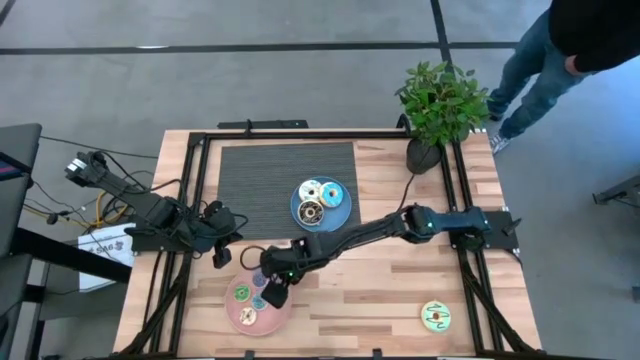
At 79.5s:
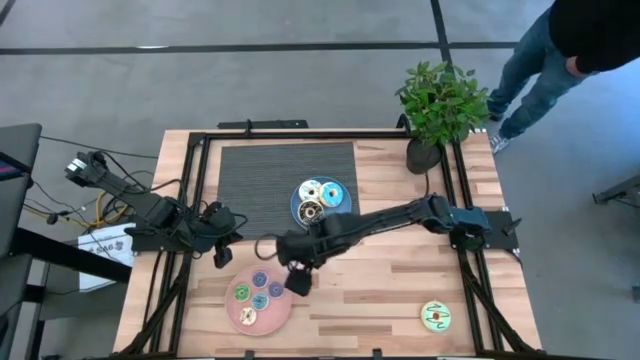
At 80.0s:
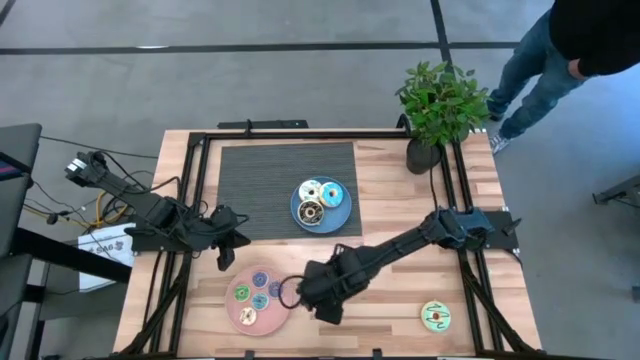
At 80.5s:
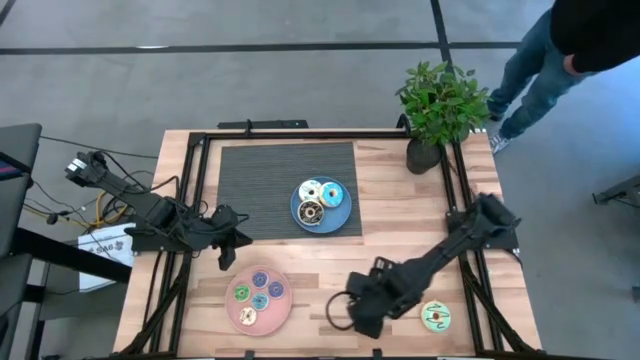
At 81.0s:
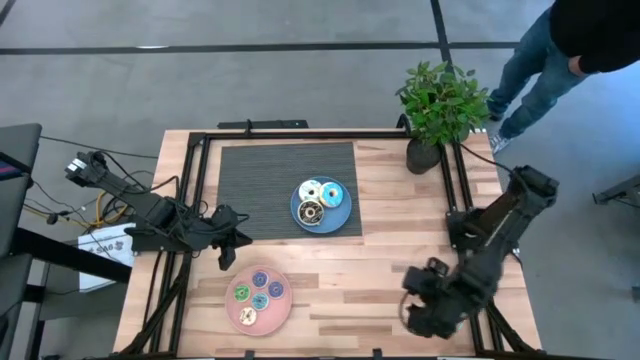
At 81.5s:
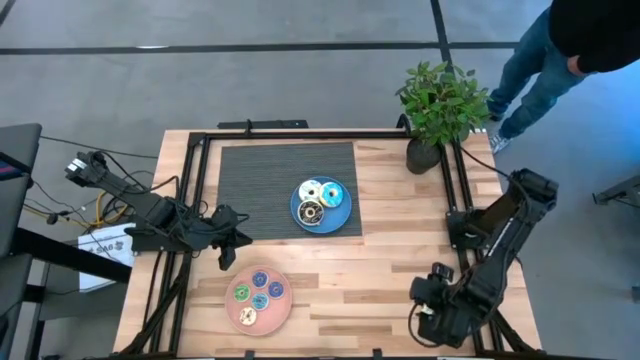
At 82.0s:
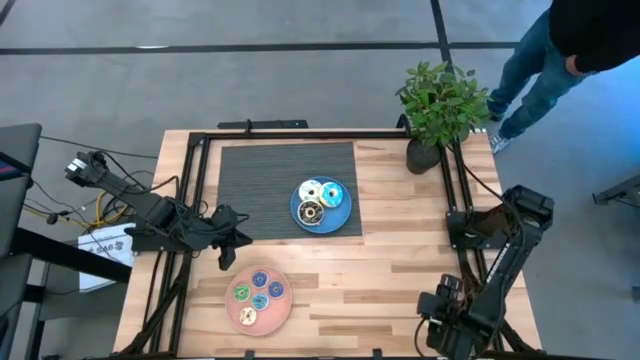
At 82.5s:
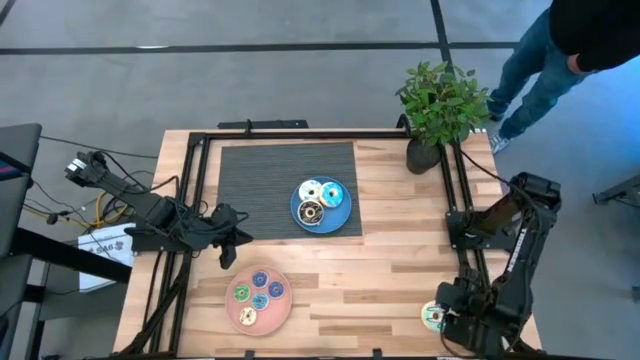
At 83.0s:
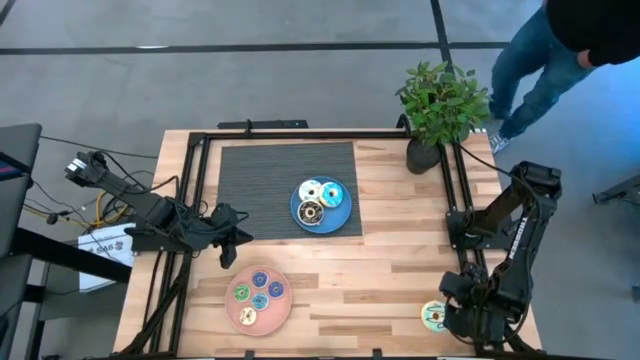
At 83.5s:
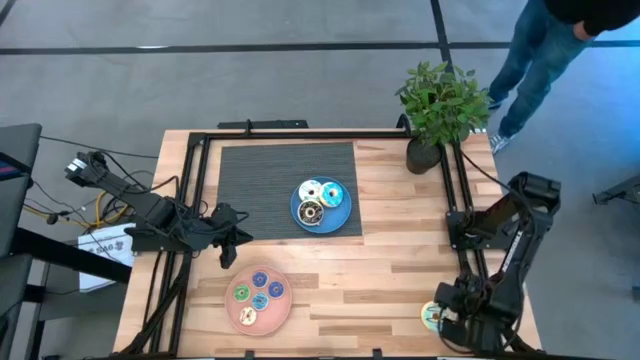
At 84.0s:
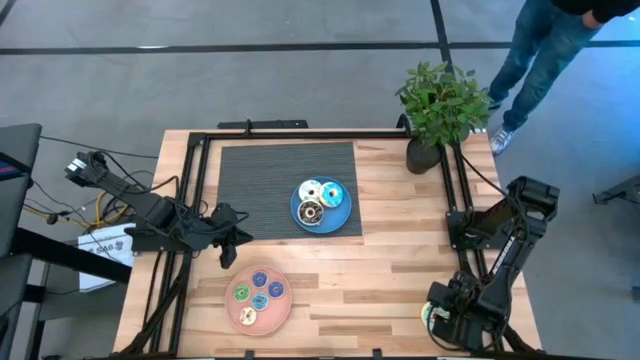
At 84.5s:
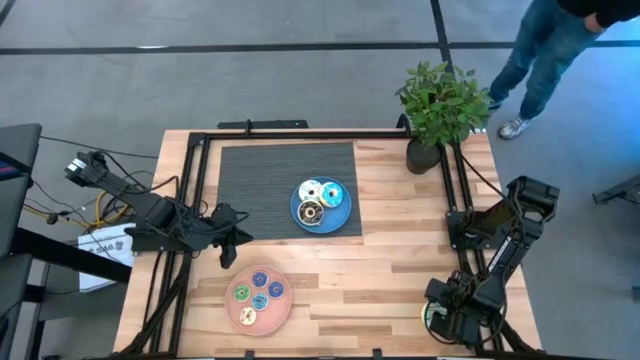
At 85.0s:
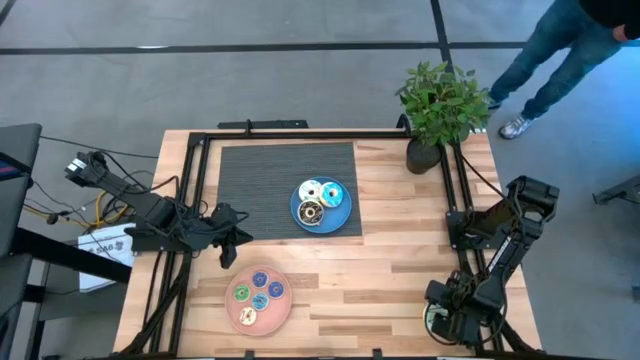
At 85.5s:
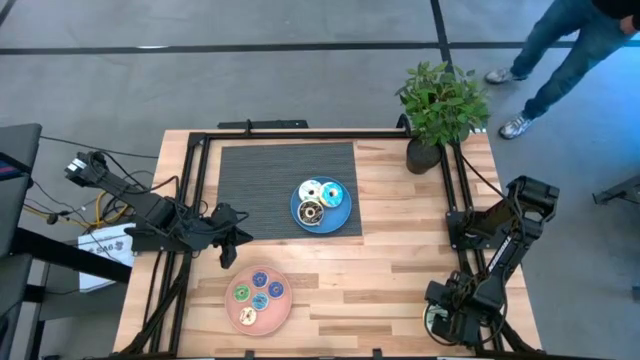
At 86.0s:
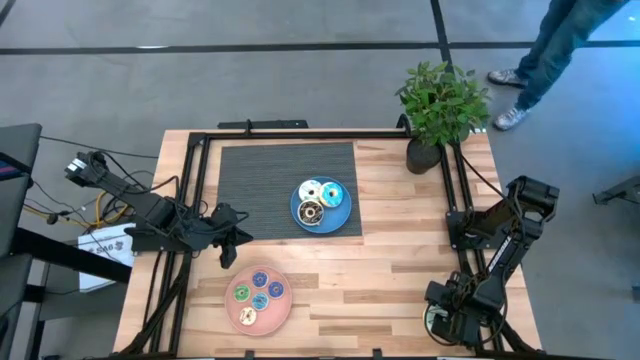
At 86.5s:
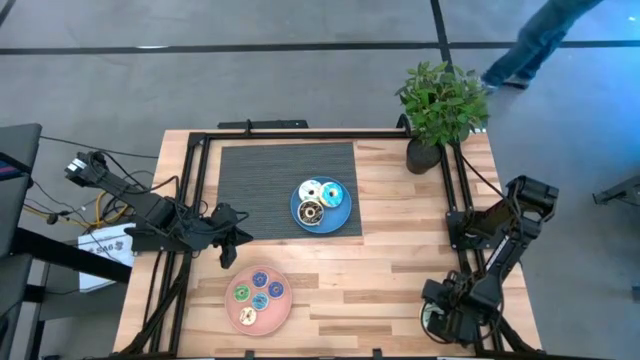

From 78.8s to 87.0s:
Task: Pick & Place donuts
Put the large light blue donut on the blue plate

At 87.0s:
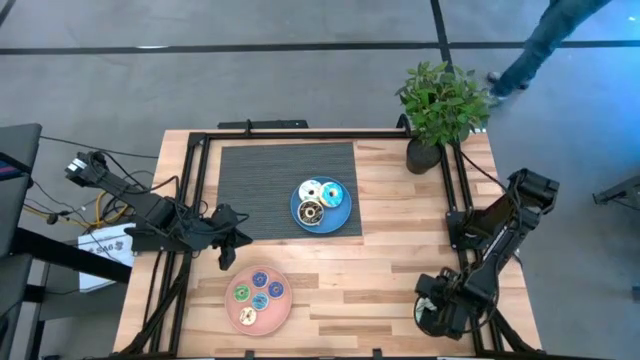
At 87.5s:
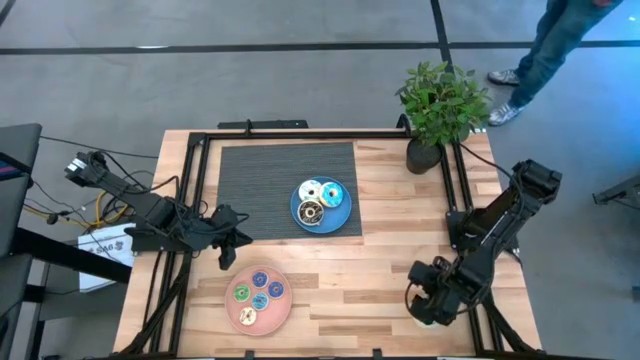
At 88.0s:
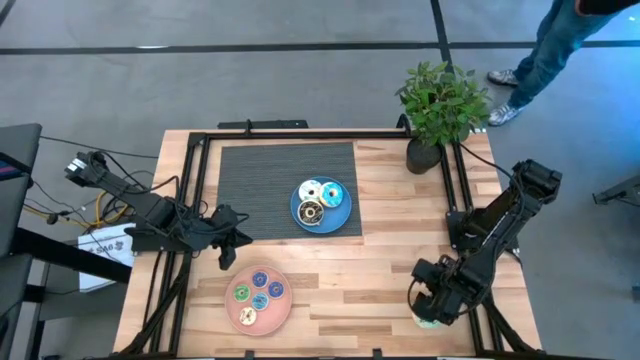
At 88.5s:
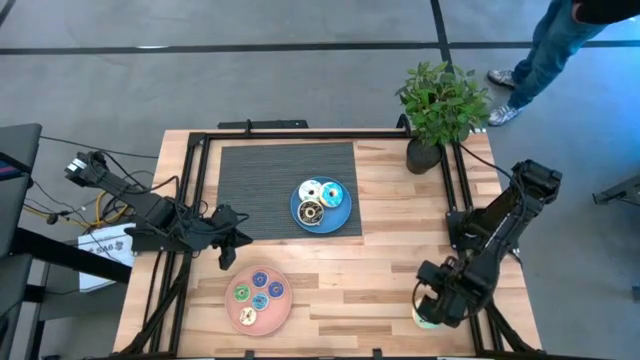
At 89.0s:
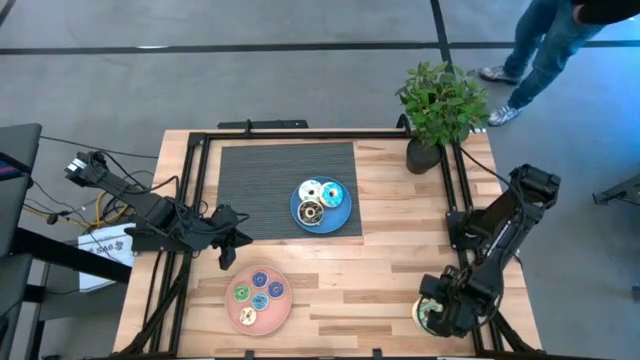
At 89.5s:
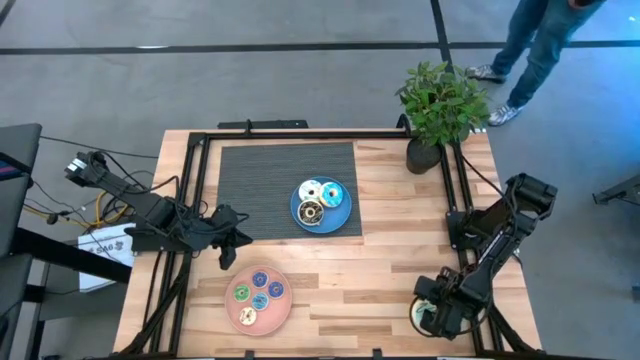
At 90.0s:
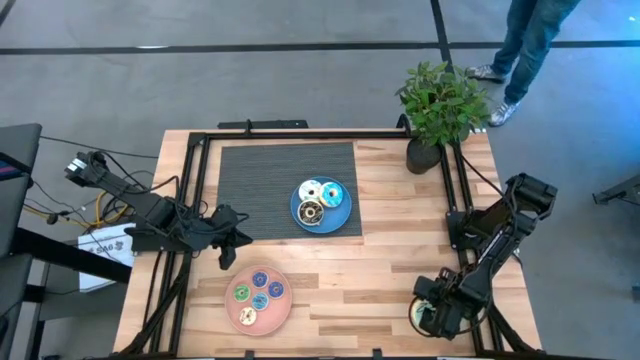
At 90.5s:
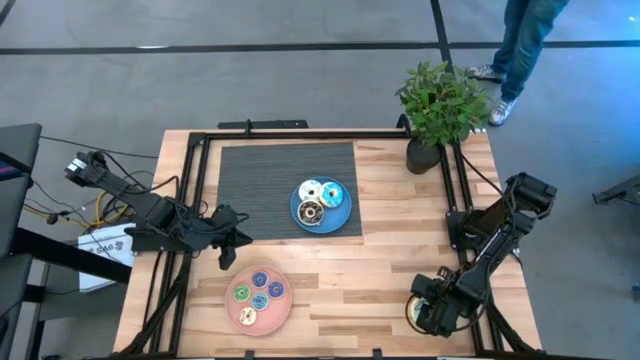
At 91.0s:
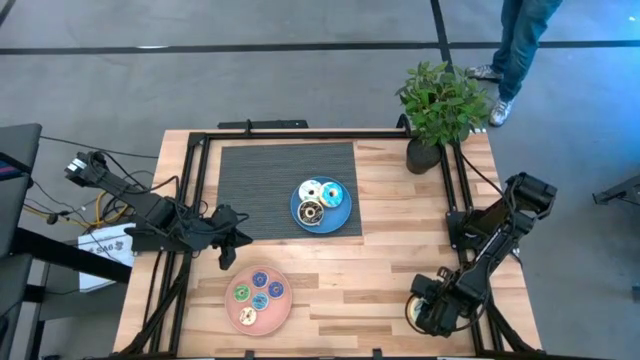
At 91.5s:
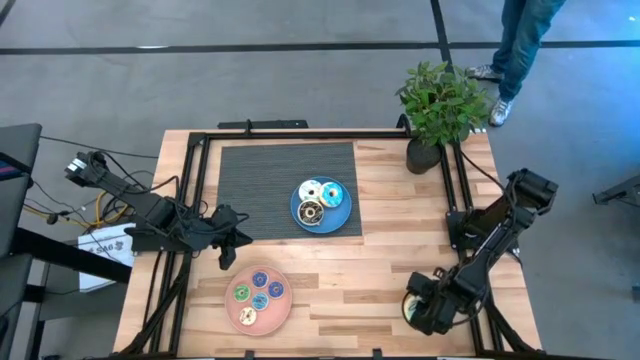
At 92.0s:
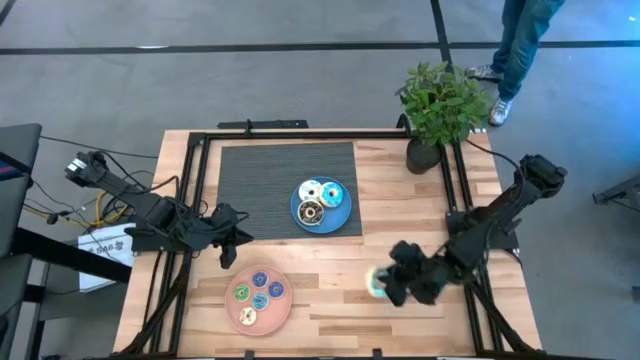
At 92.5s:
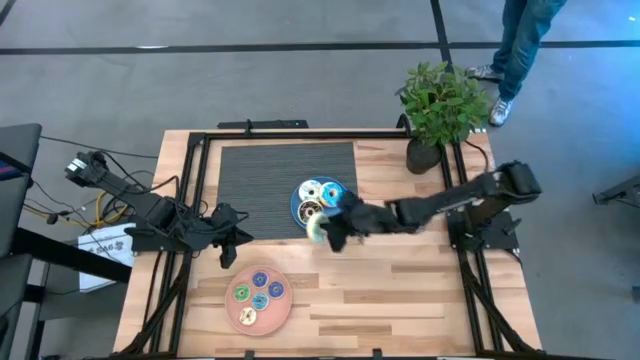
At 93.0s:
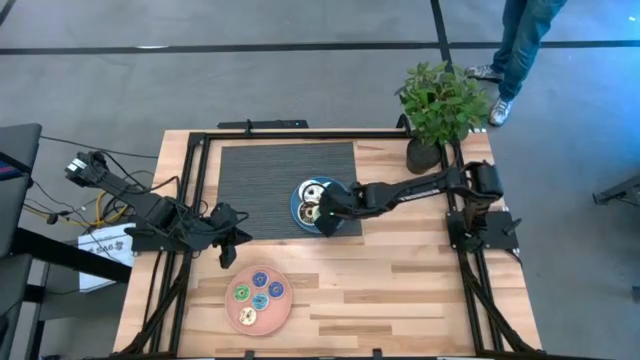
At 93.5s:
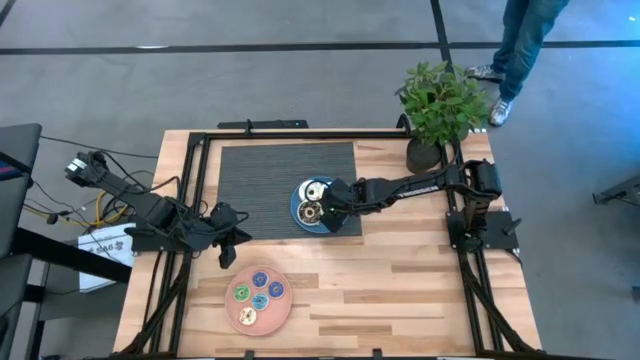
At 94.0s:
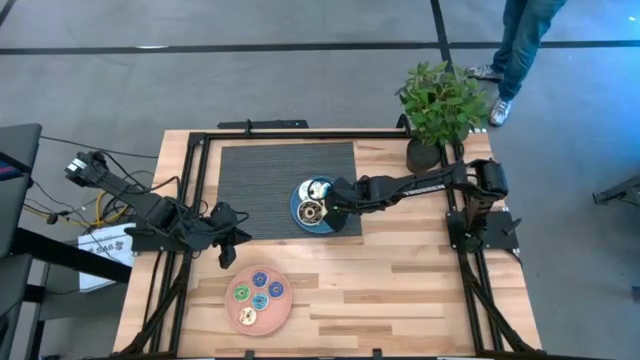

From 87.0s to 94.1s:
Put the large light blue donut on the blue plate

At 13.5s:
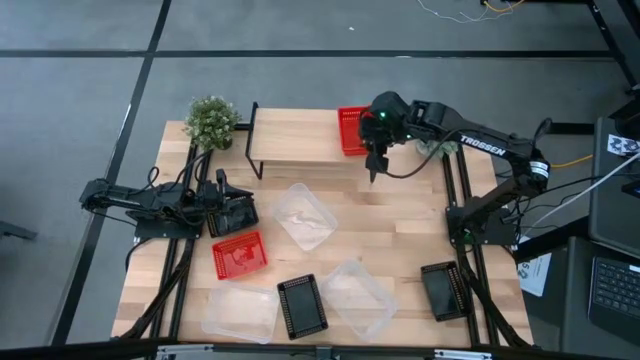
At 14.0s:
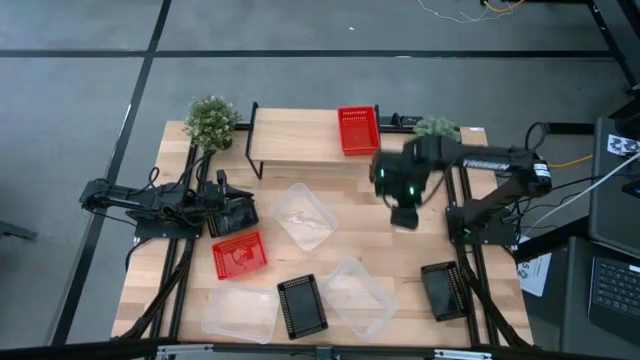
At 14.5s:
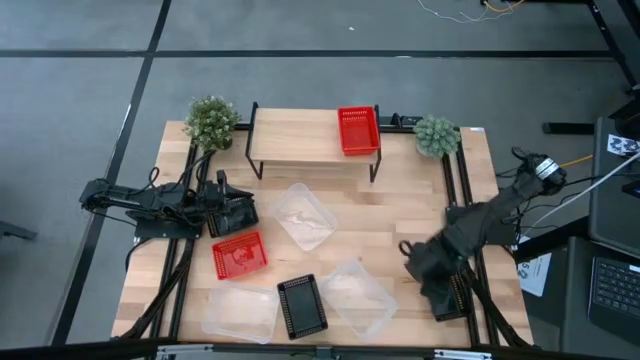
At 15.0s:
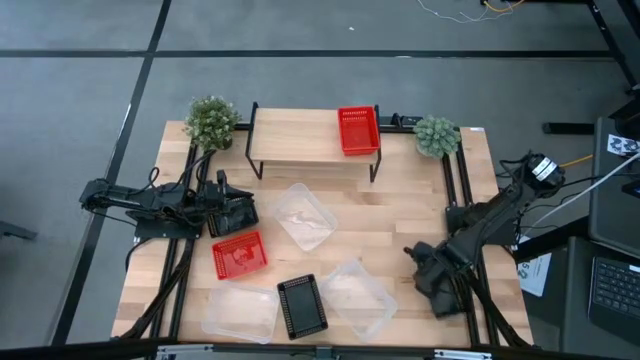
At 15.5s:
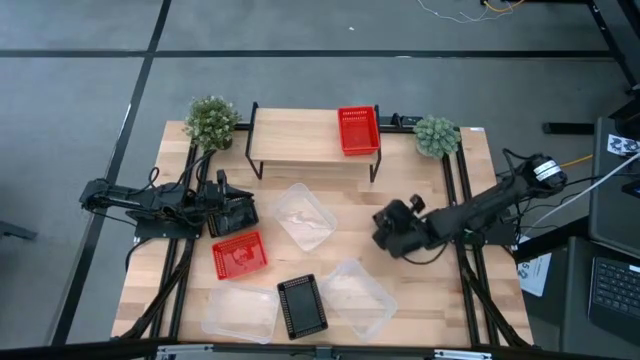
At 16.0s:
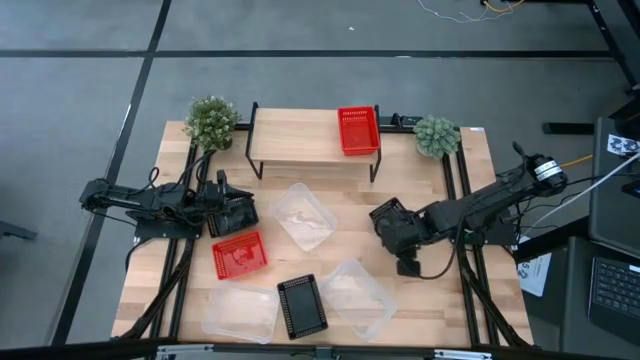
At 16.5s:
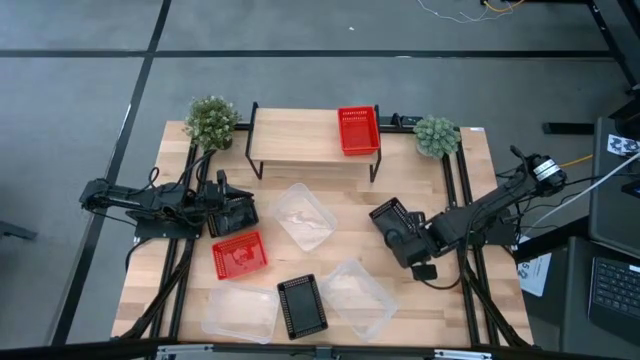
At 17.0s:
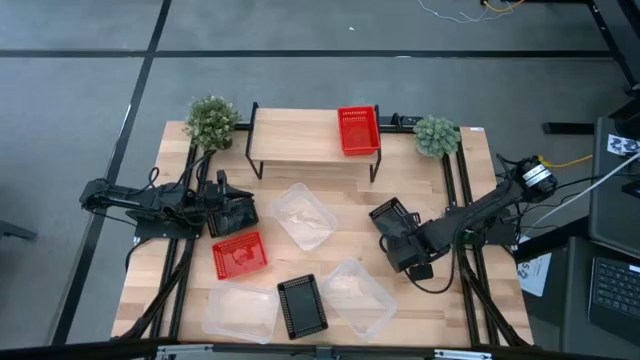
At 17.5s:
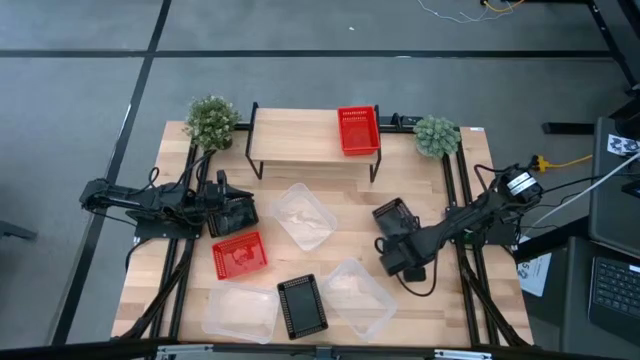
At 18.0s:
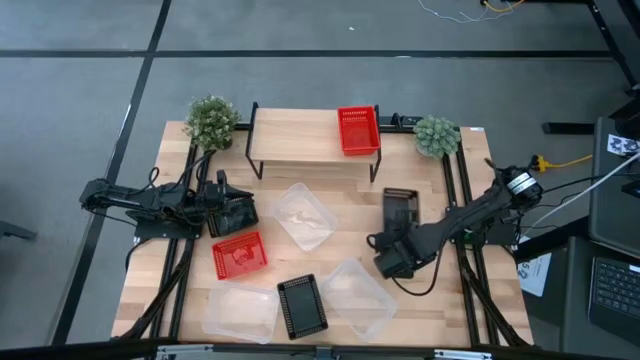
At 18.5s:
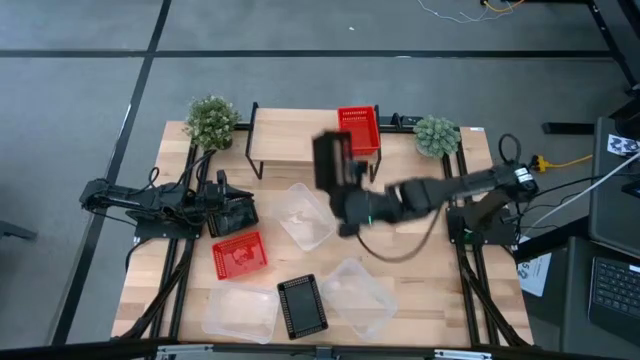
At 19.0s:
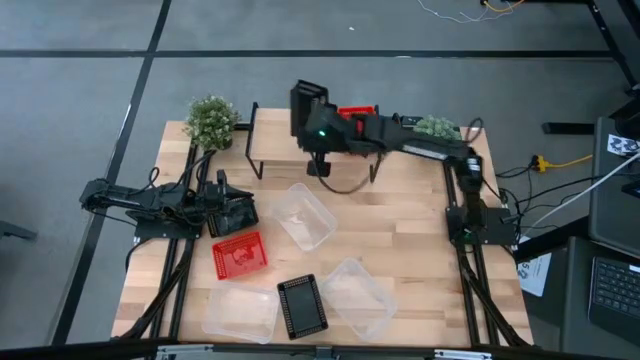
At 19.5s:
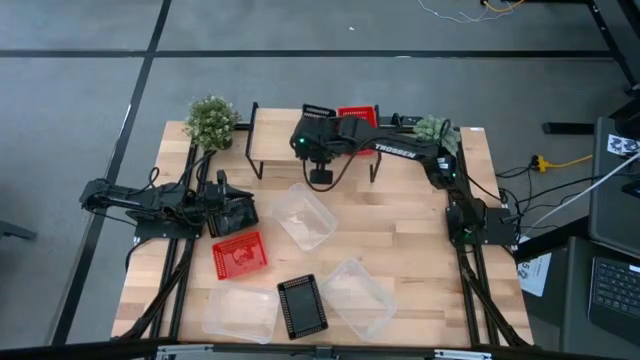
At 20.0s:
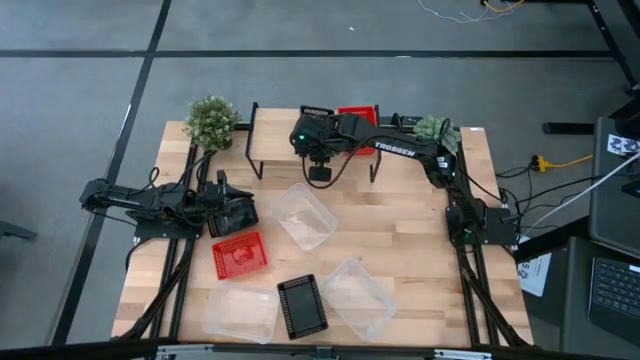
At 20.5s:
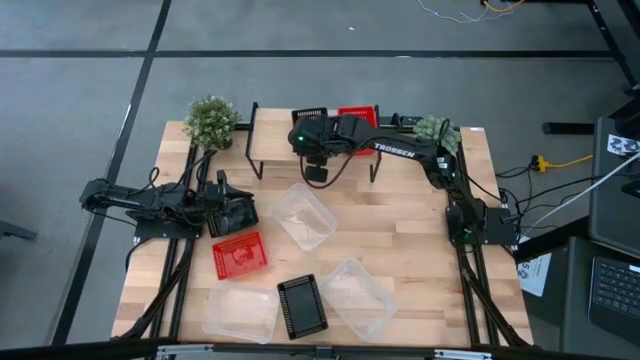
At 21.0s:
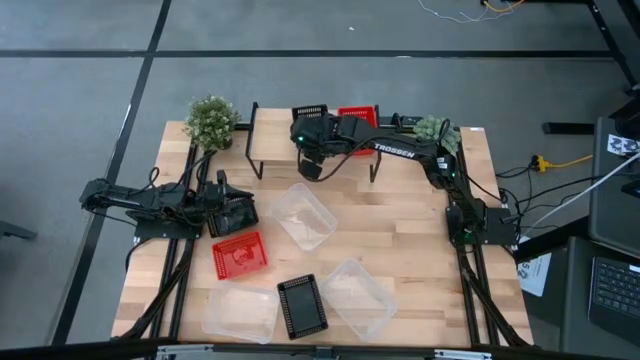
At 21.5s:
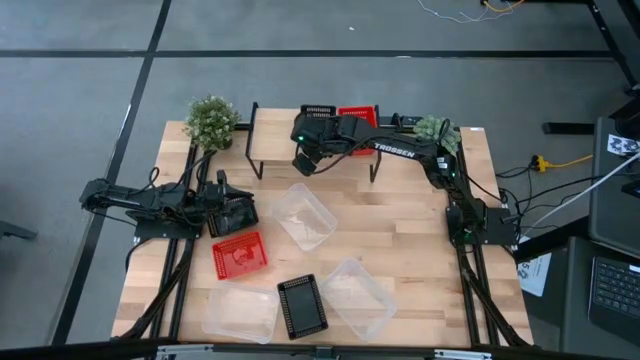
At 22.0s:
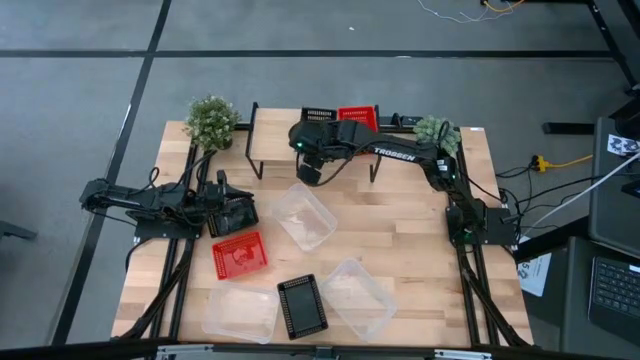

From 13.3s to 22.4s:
Task: Stack baskets on shelf by color
Put the bottom right black bin on the shelf
